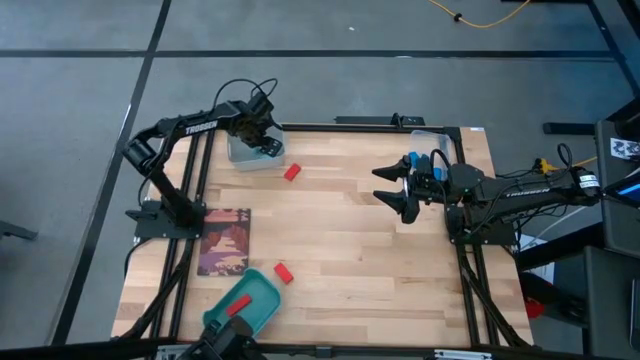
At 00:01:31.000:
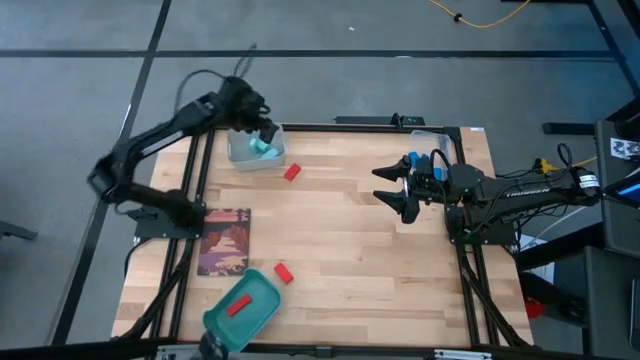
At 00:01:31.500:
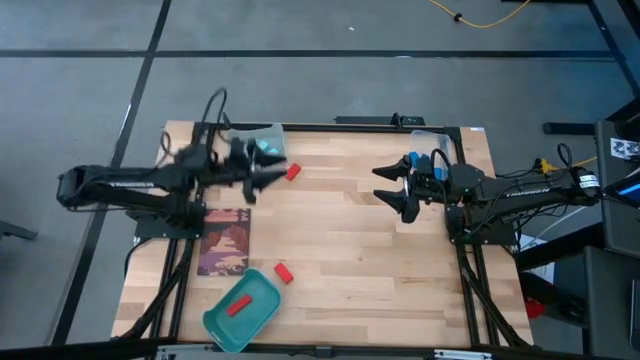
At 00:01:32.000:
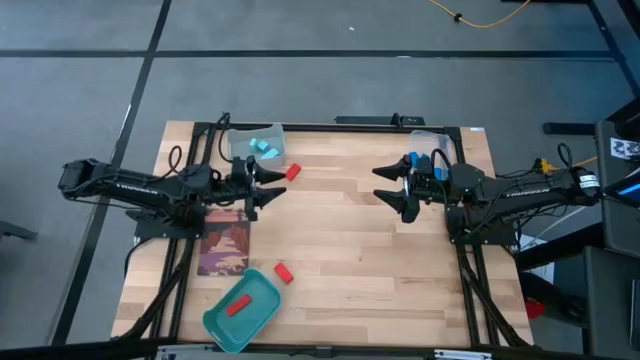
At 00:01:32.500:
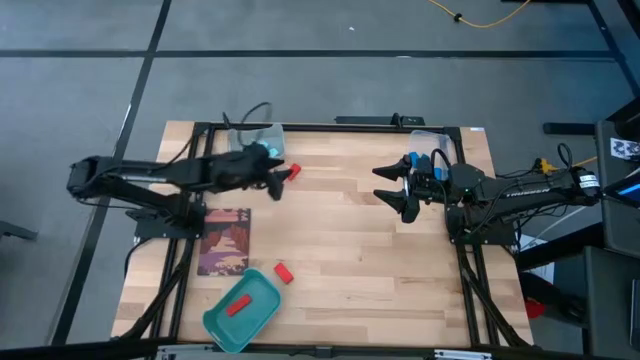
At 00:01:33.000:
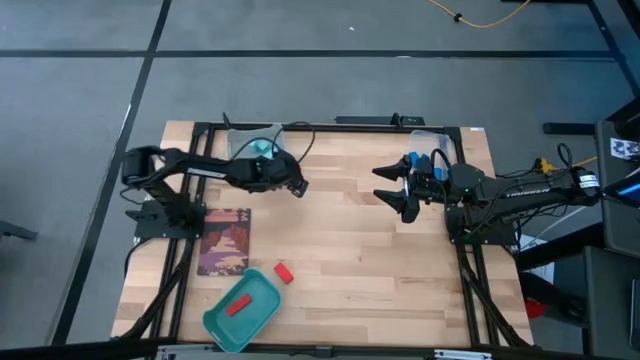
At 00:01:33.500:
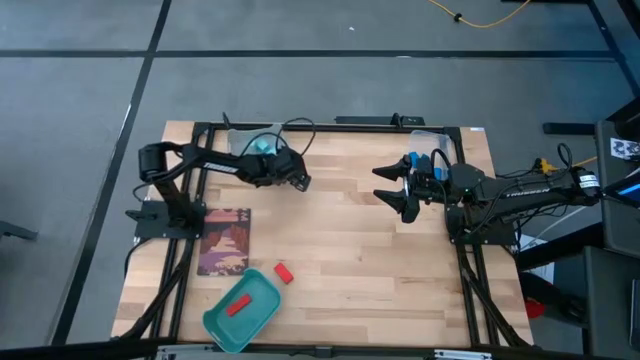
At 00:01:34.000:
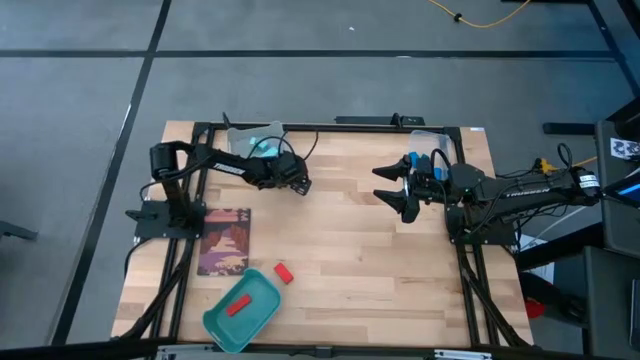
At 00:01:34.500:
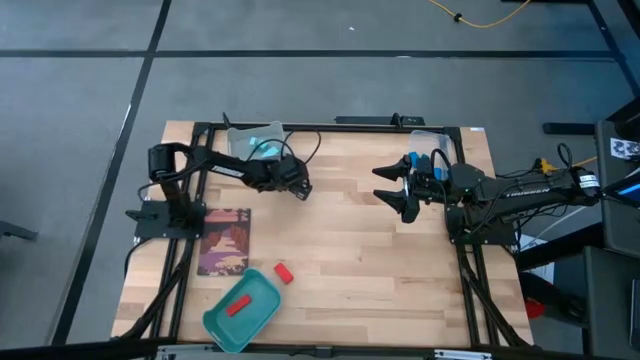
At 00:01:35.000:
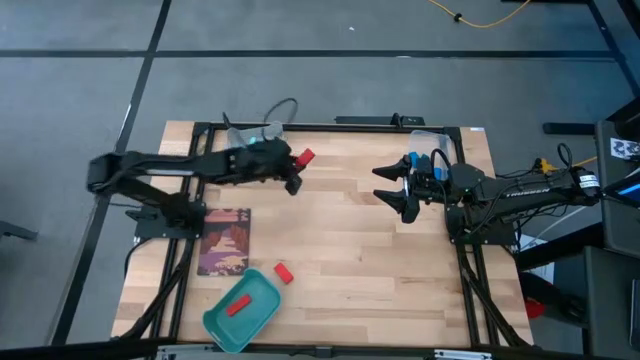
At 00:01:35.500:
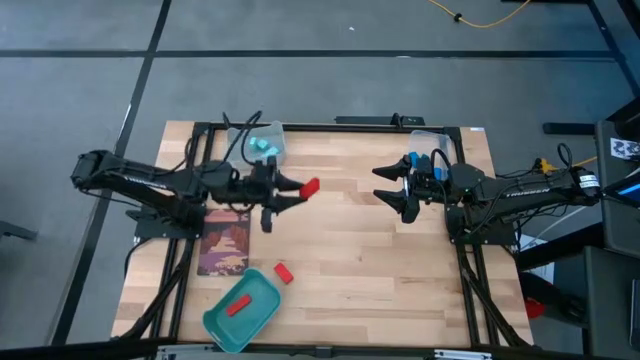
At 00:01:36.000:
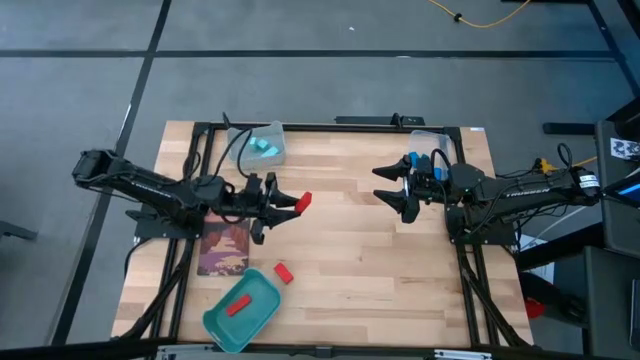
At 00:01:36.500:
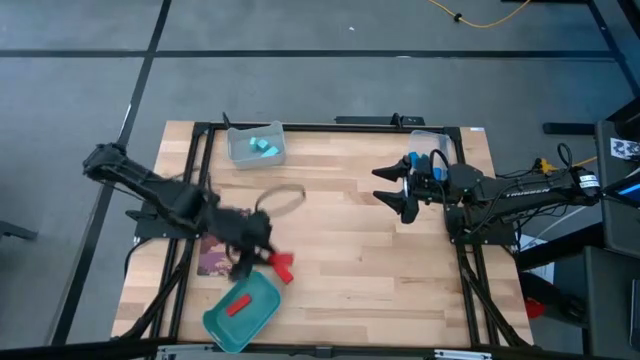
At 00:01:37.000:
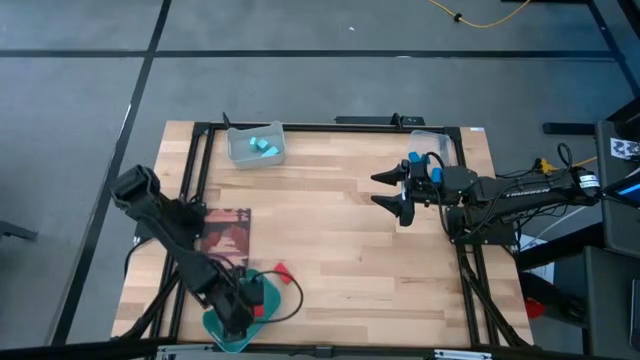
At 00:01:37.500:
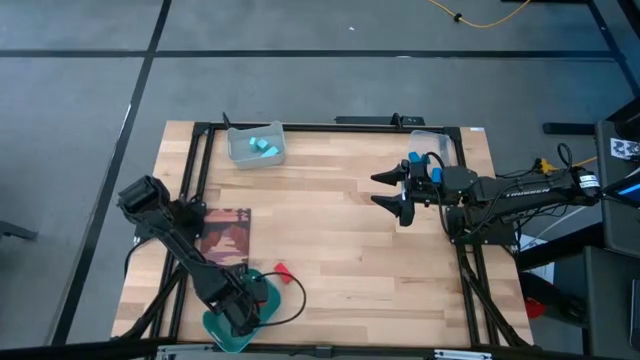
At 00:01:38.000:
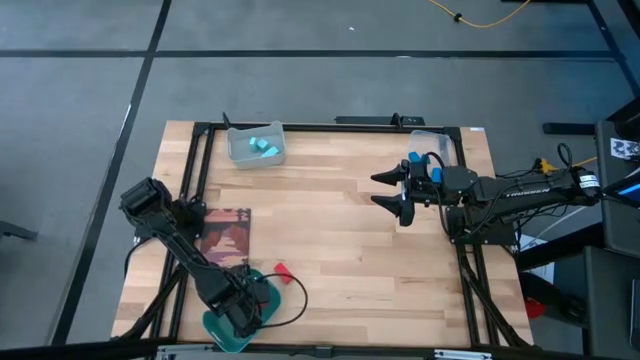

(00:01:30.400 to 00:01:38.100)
Task: Sort & place blocks by color
Put the top red block into the green bin

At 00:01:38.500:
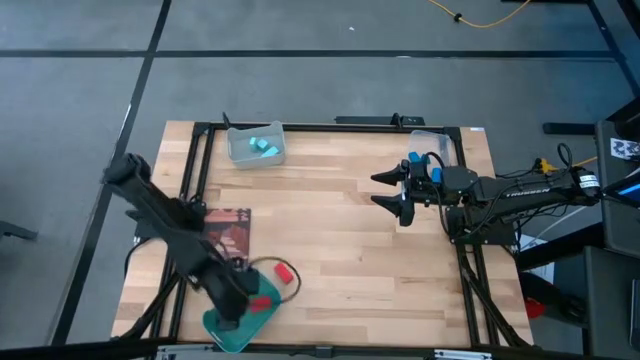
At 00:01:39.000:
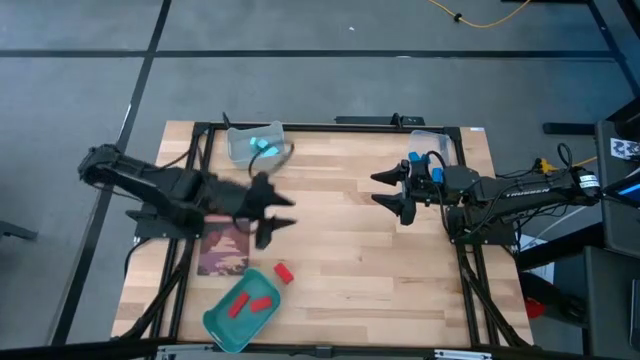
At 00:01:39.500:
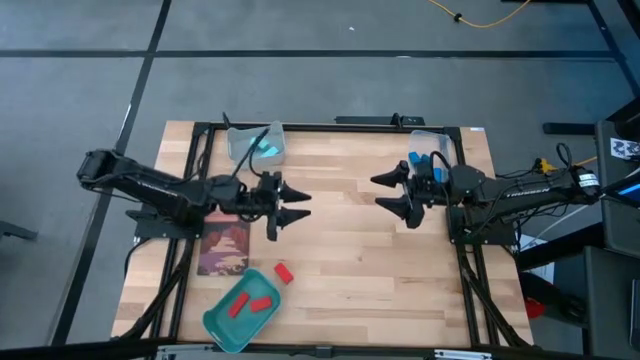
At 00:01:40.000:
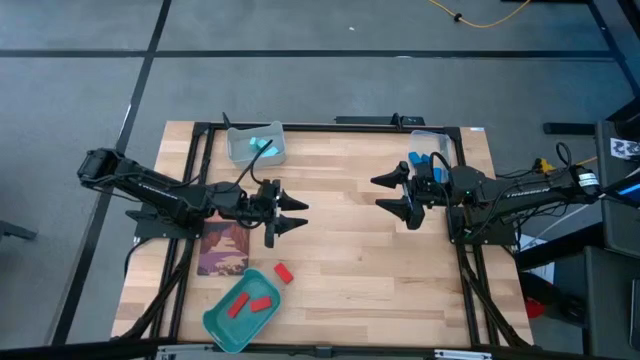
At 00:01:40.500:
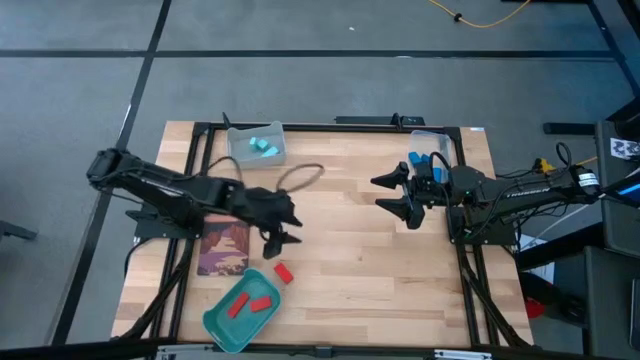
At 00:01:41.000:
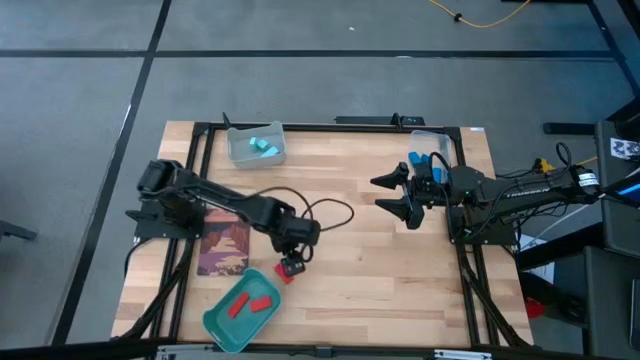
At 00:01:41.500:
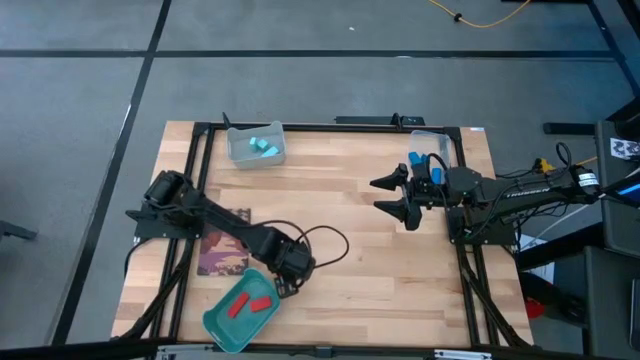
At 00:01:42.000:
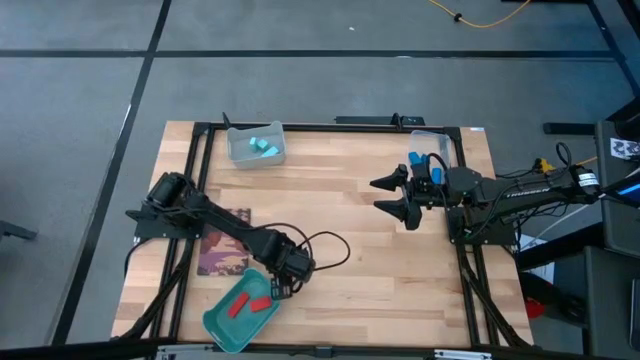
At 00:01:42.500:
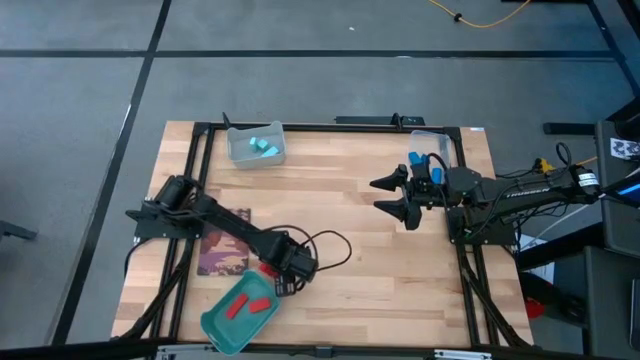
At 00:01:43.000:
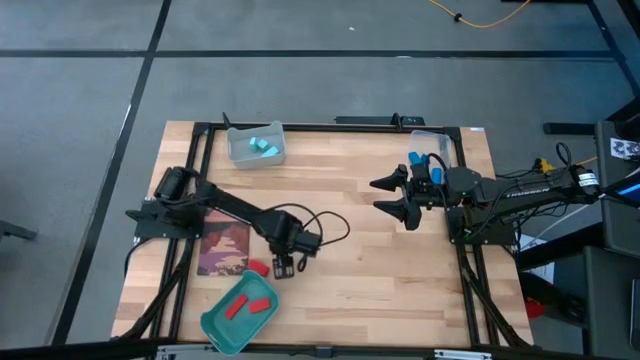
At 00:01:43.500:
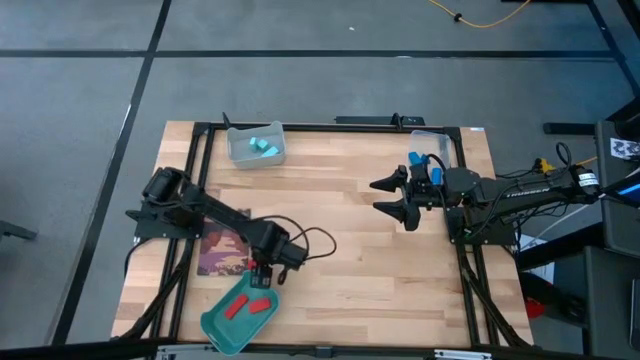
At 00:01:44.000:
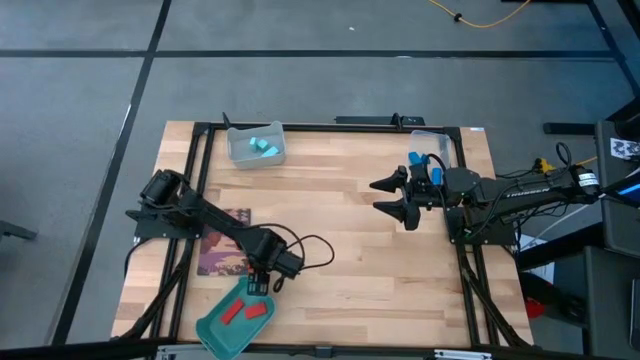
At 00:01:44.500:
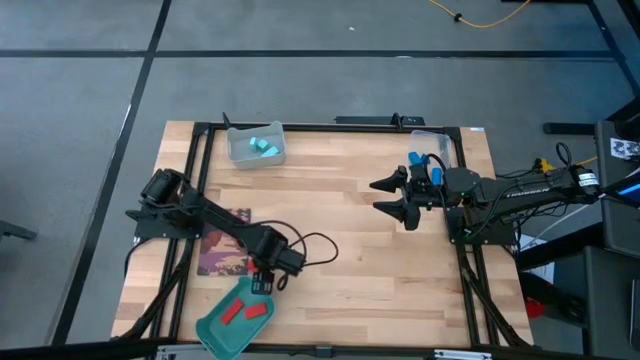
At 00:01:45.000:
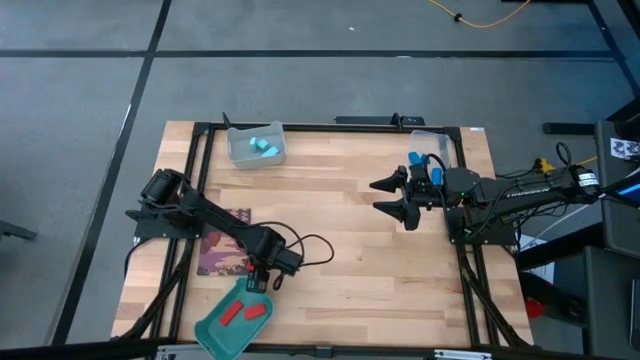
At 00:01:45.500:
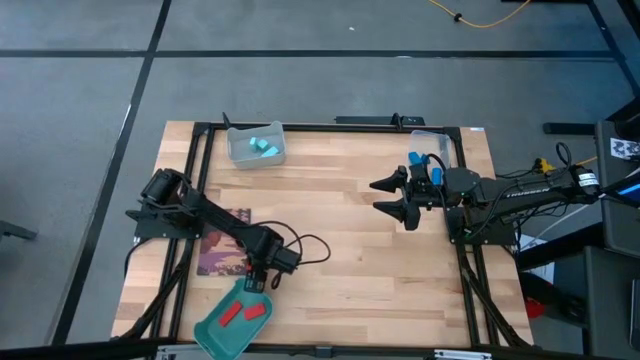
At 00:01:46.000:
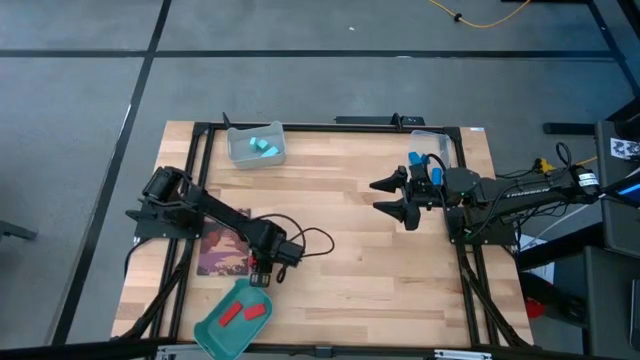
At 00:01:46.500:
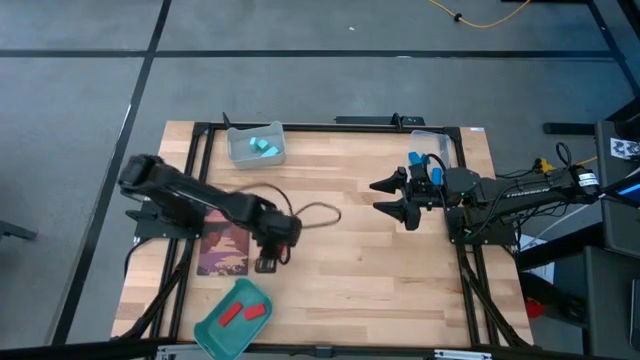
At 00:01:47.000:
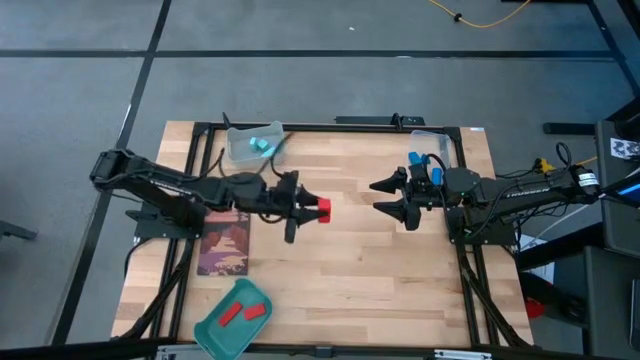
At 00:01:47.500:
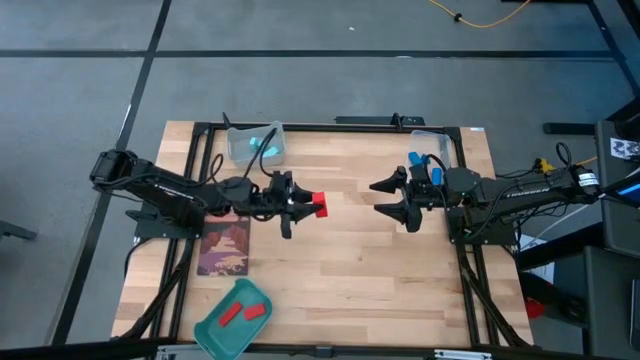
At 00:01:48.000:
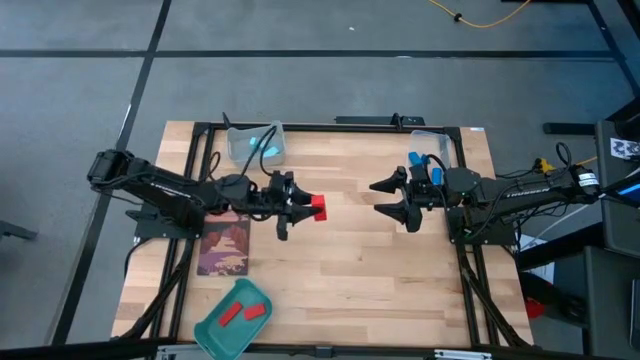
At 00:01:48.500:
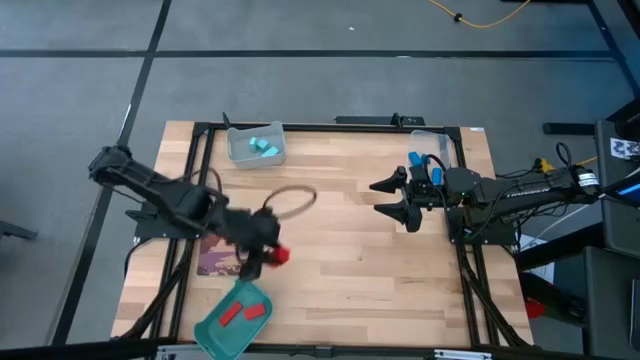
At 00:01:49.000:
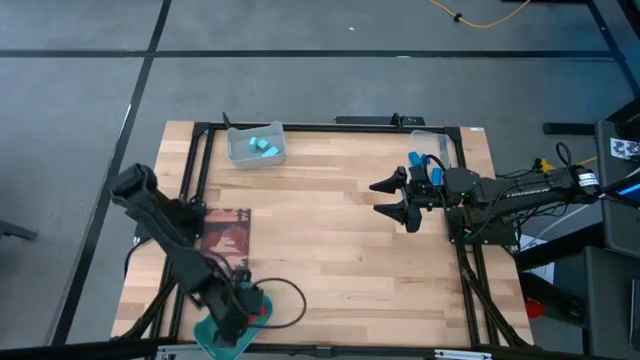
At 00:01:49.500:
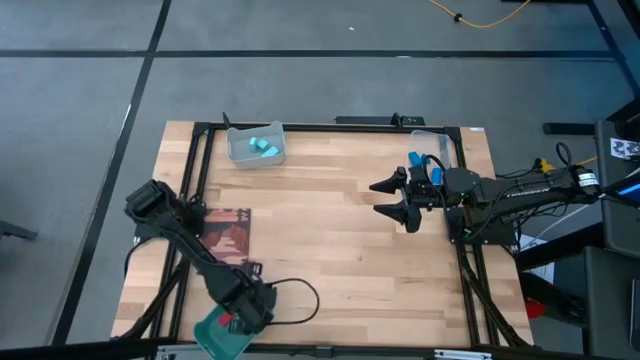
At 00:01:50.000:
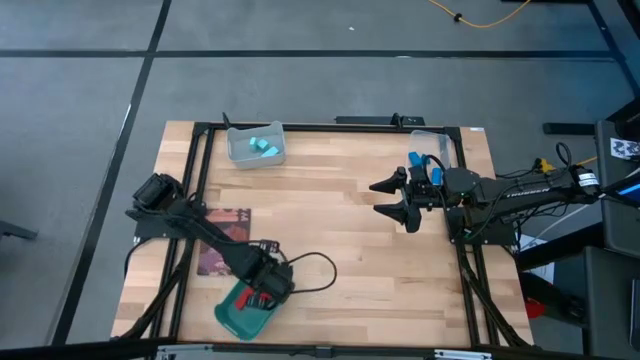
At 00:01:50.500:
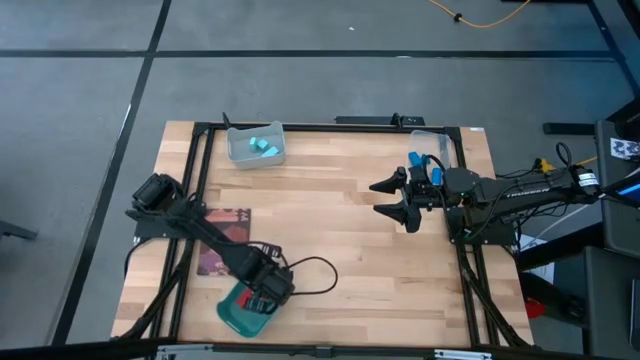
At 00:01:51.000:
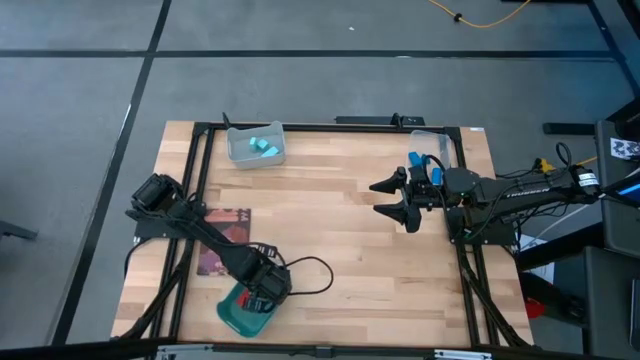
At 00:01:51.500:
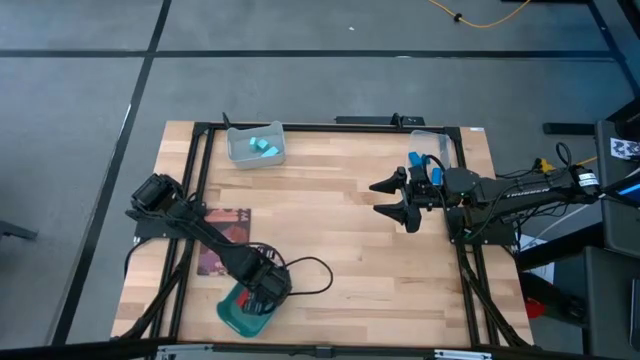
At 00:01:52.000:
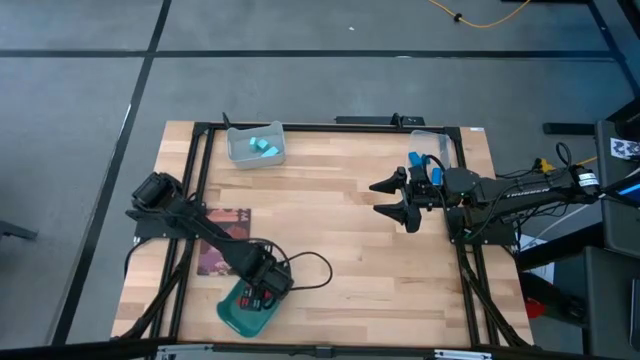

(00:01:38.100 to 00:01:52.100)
Put the red block into the green bin
